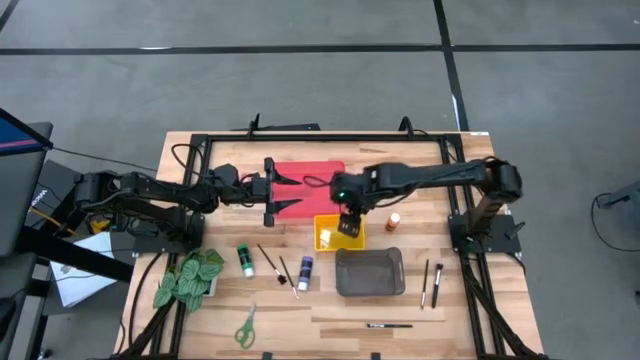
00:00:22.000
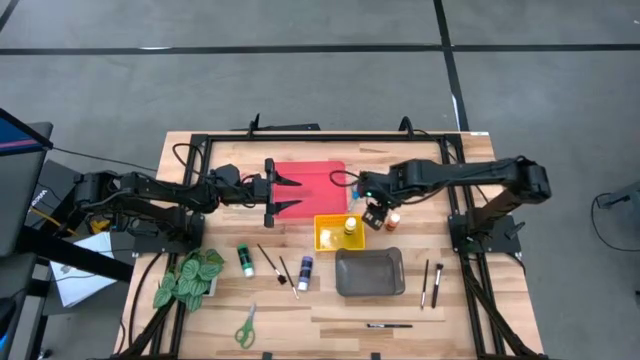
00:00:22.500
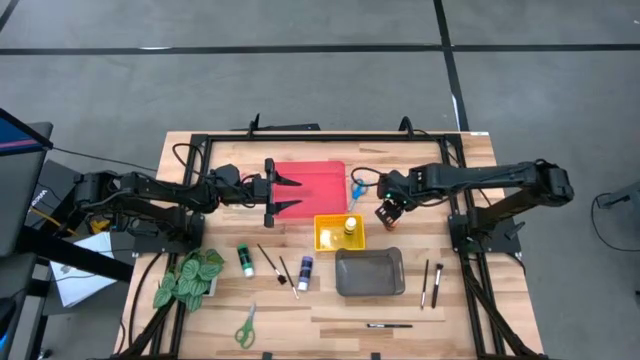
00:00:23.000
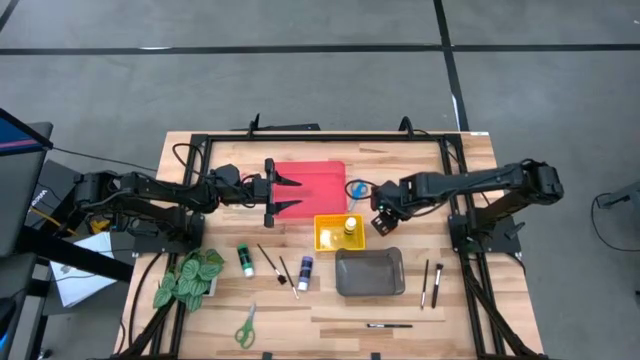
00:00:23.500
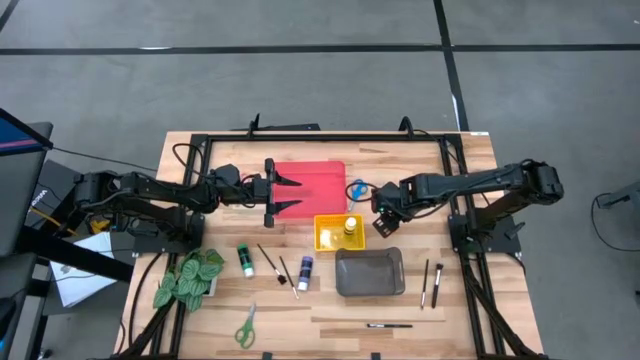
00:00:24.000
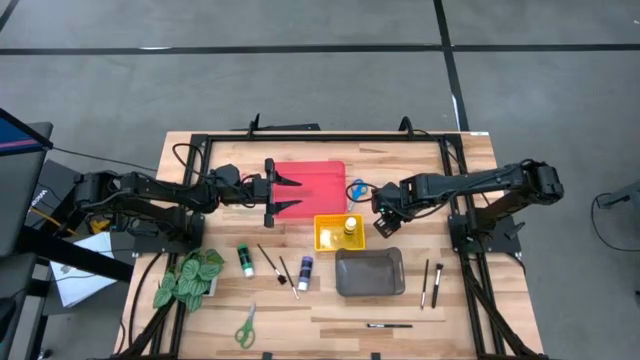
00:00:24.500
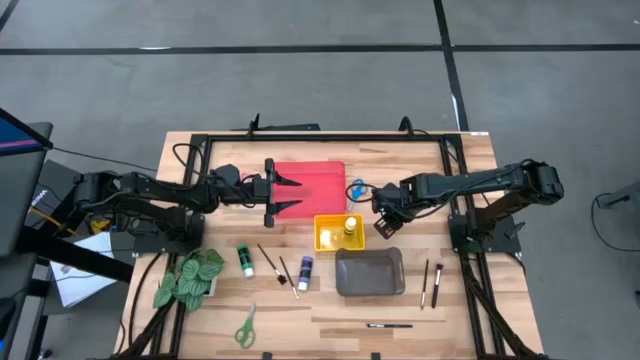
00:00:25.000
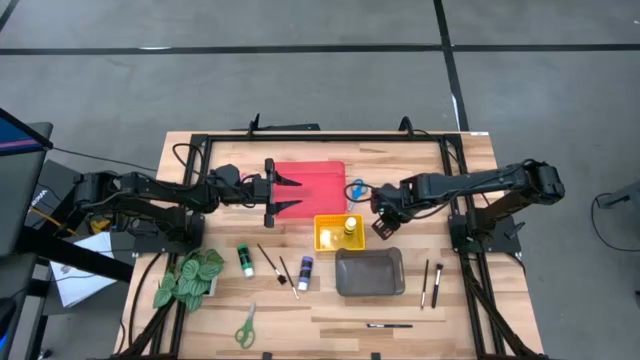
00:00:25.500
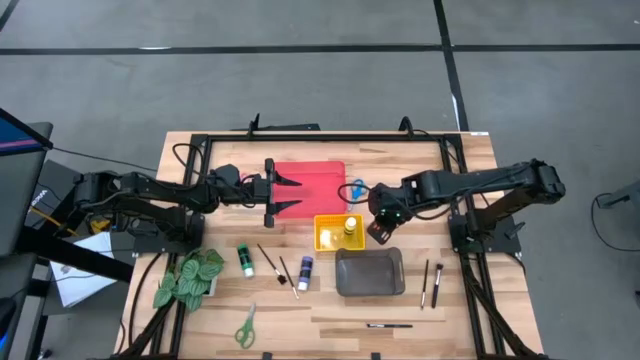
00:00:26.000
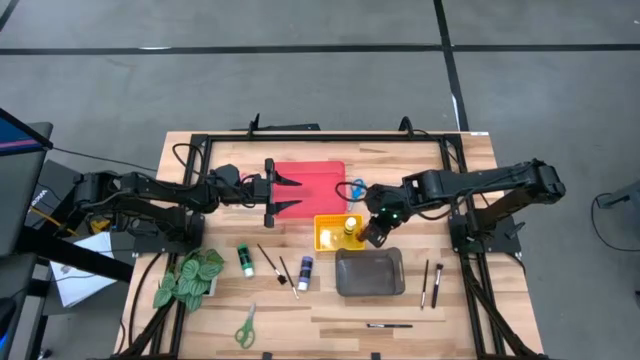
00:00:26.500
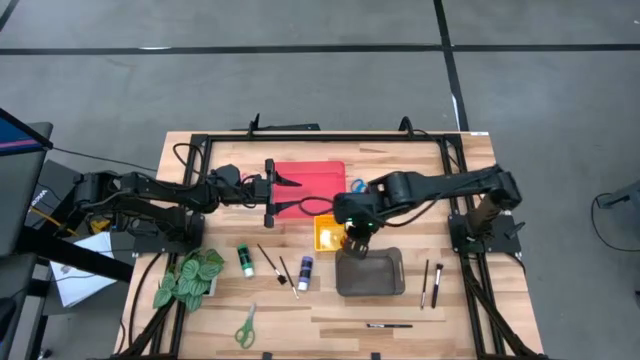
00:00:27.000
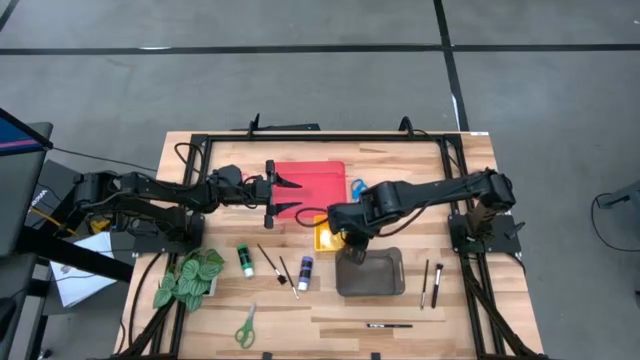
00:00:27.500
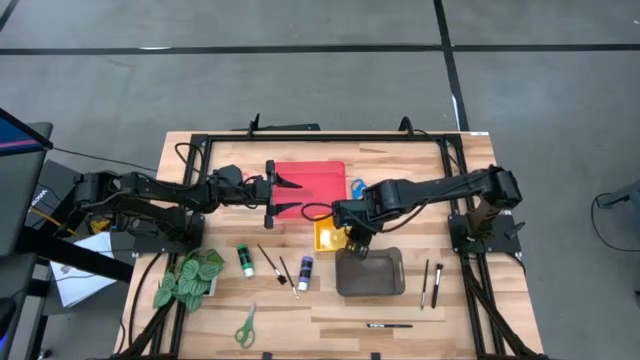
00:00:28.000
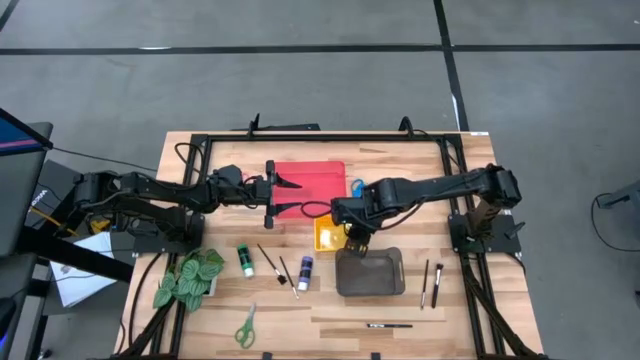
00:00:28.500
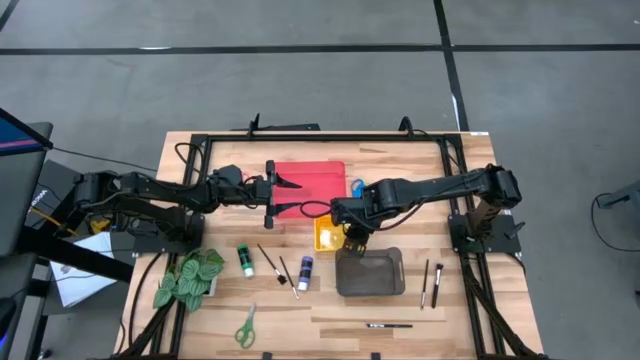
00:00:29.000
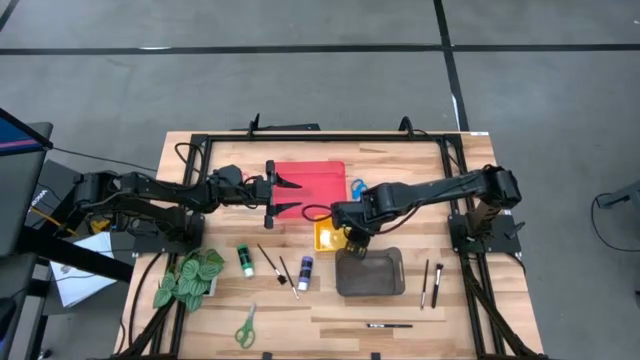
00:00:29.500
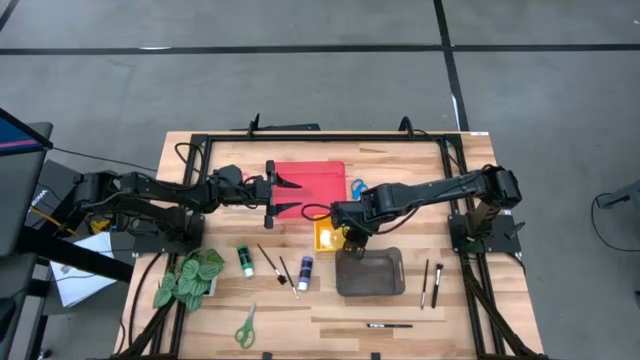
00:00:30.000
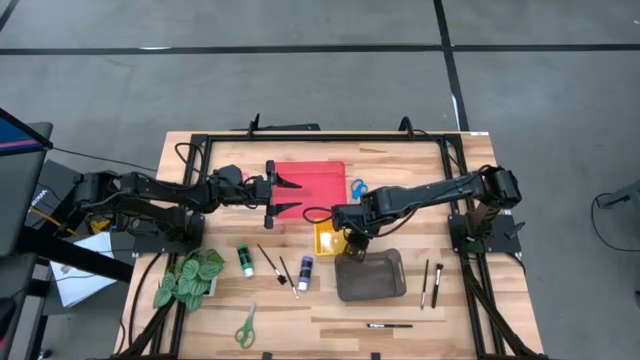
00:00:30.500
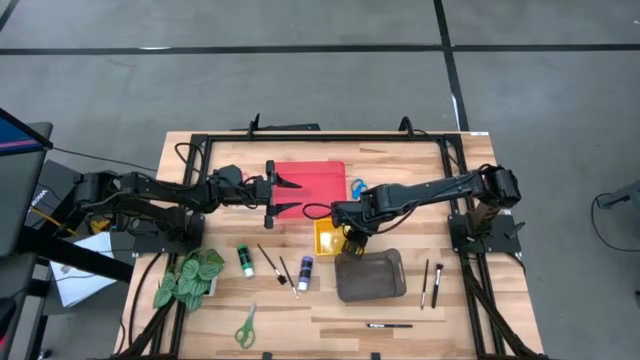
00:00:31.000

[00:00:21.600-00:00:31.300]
Task: Pick & Place Paint Supplies
Put the orange paint bottle into the yellow bin

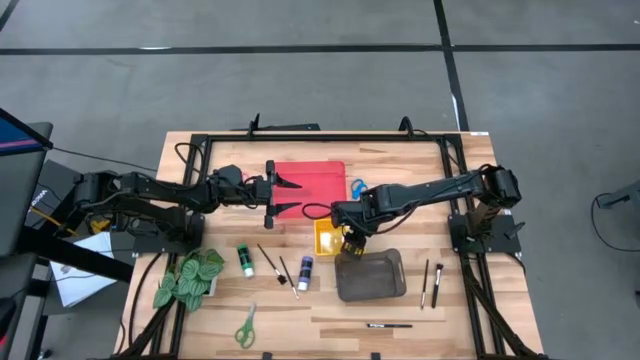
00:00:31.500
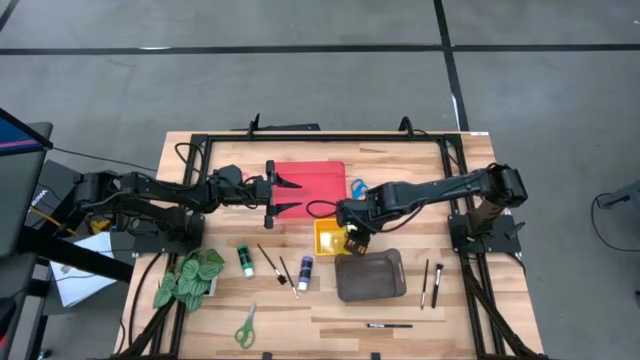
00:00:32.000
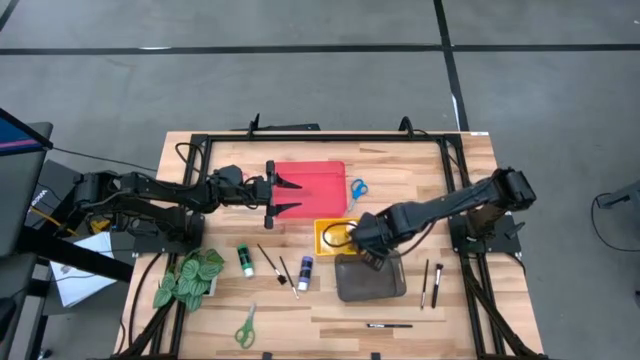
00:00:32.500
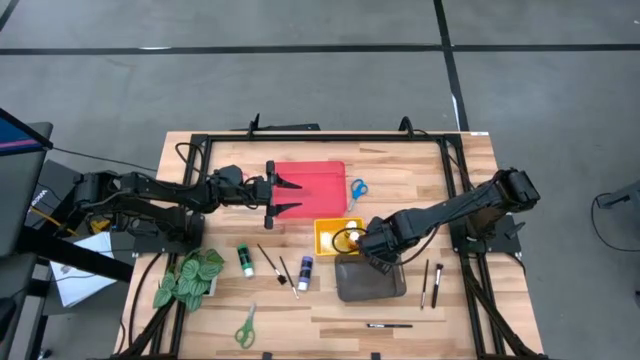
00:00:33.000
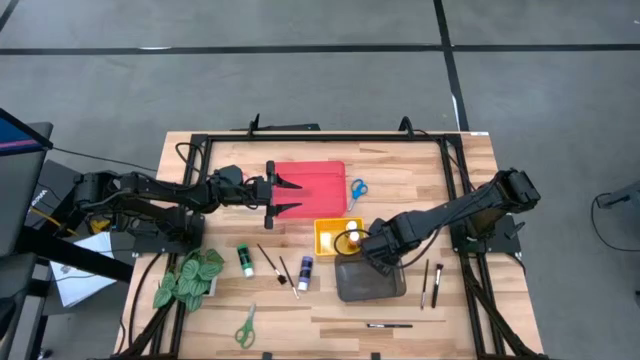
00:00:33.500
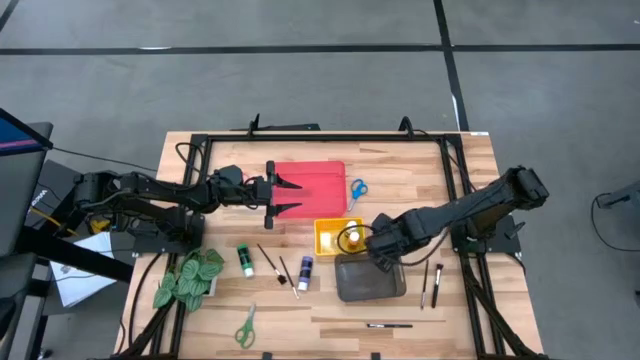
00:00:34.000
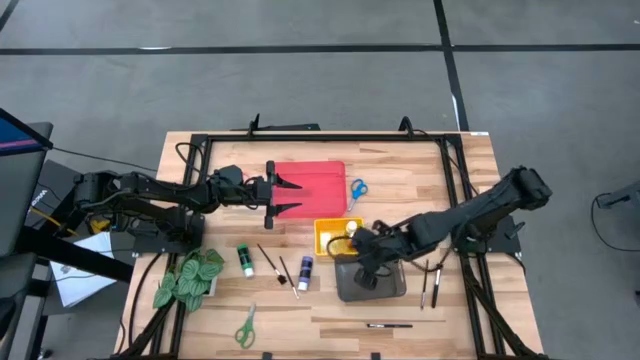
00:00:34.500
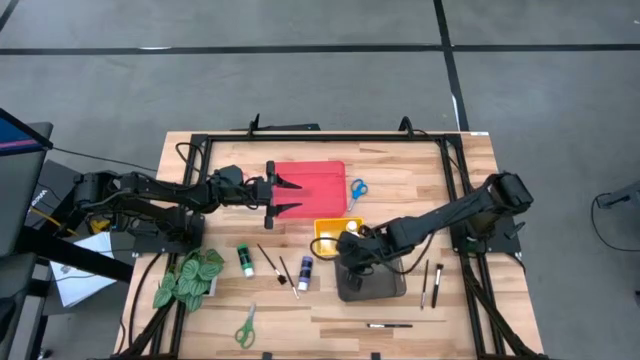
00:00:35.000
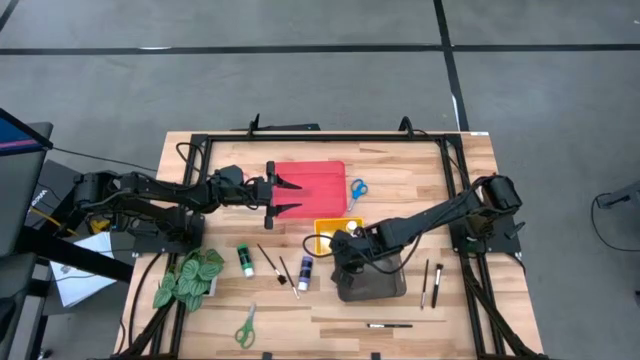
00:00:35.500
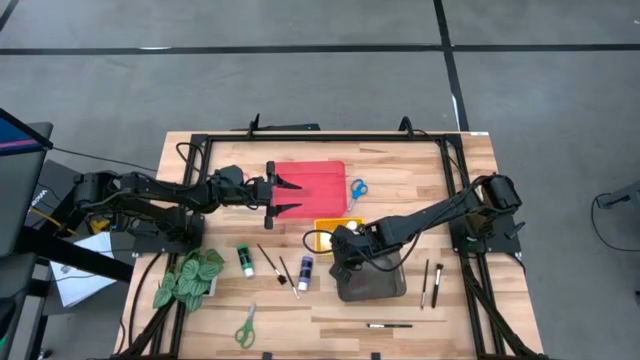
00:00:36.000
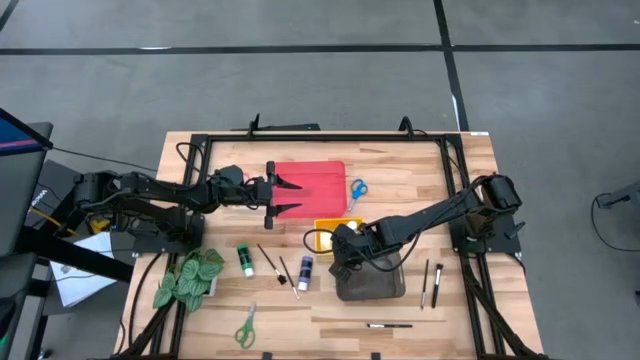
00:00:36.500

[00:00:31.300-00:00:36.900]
Adjust the black bin

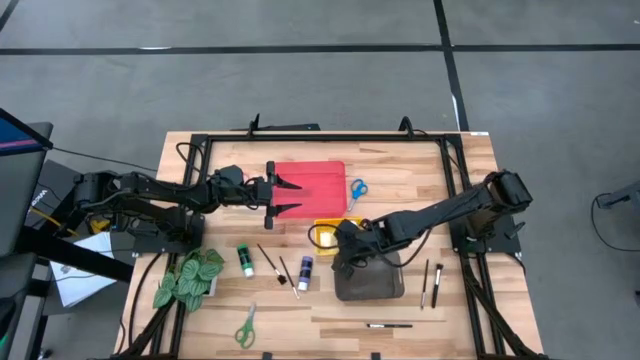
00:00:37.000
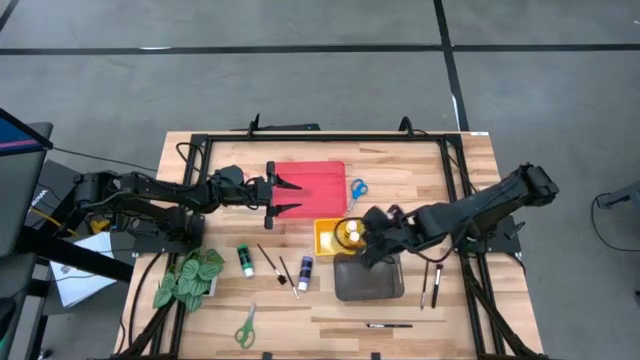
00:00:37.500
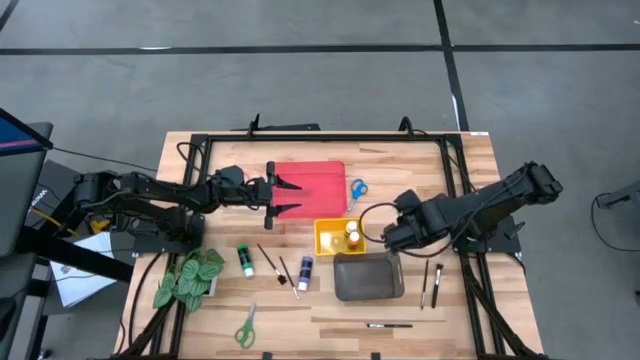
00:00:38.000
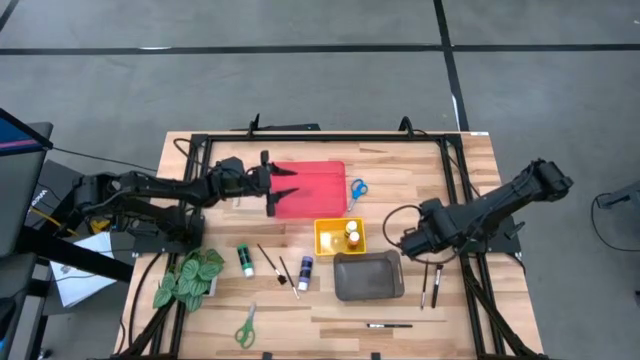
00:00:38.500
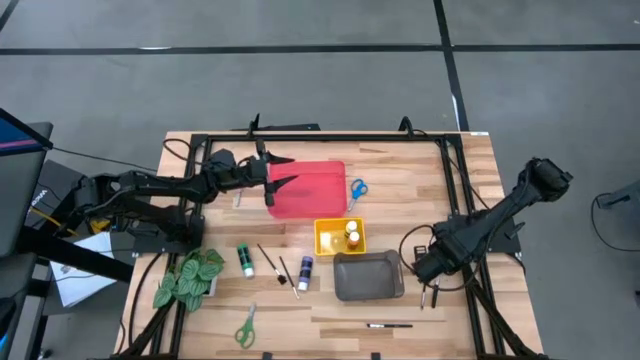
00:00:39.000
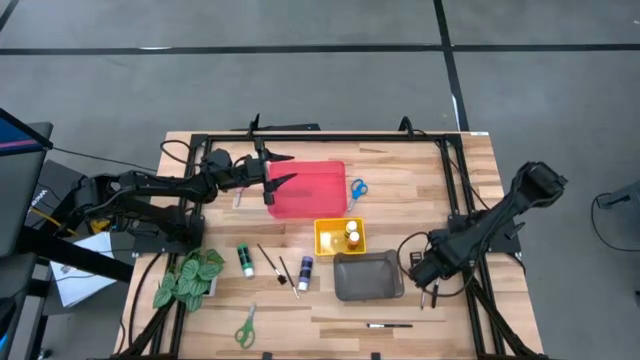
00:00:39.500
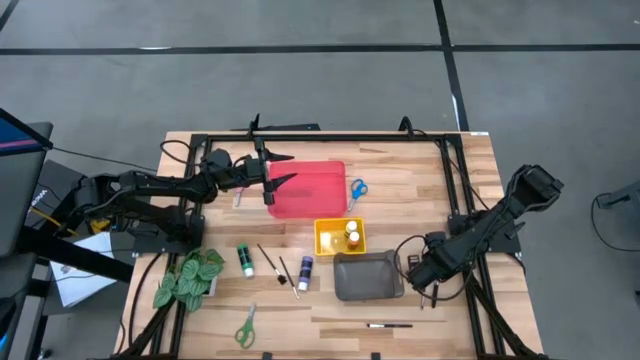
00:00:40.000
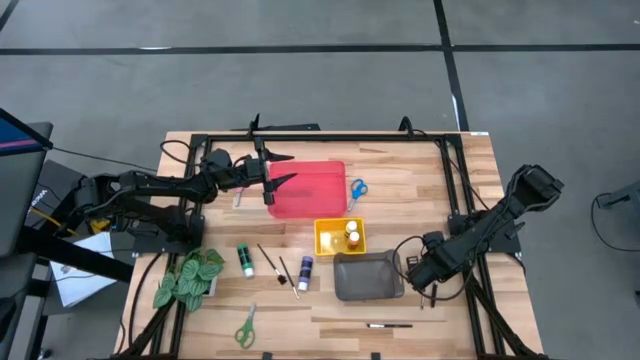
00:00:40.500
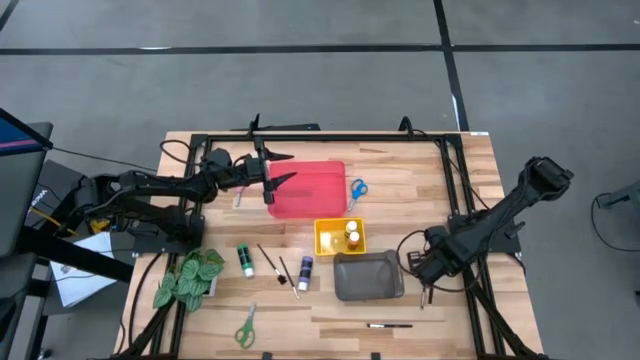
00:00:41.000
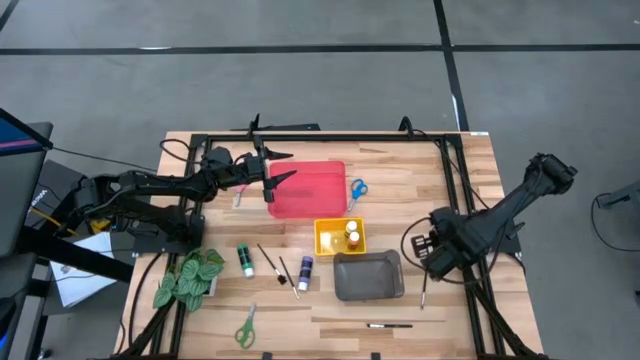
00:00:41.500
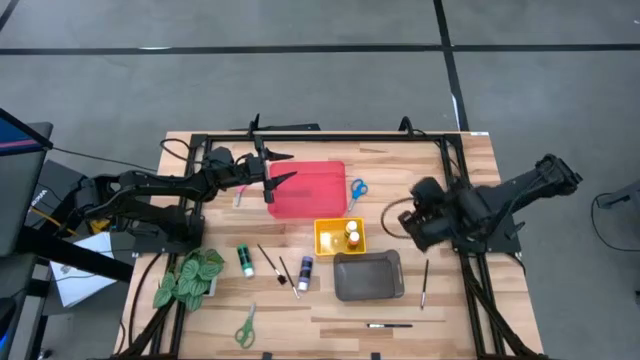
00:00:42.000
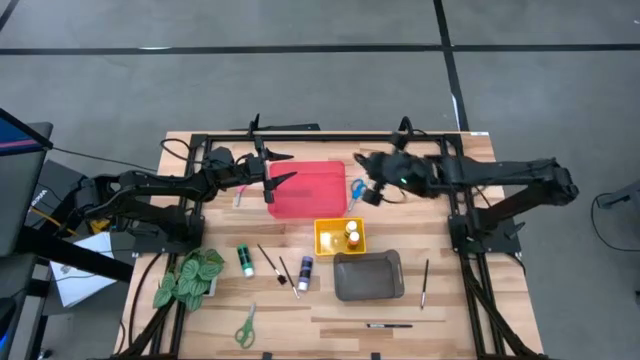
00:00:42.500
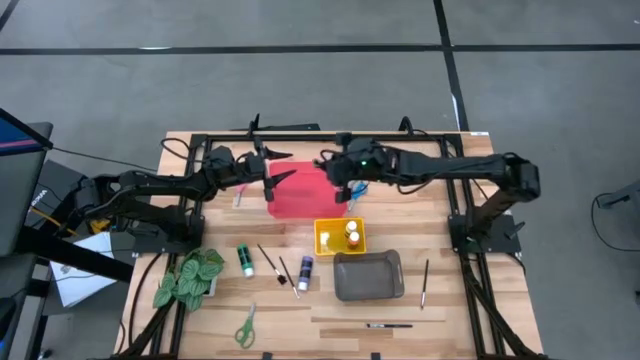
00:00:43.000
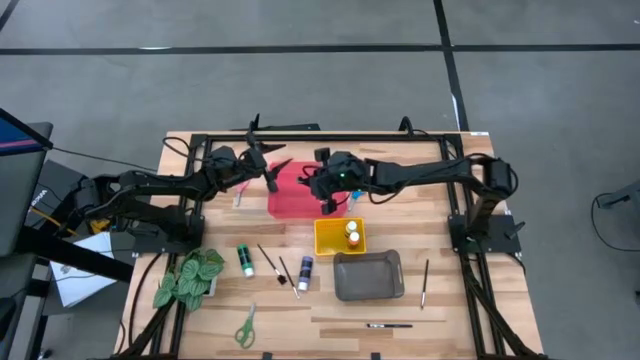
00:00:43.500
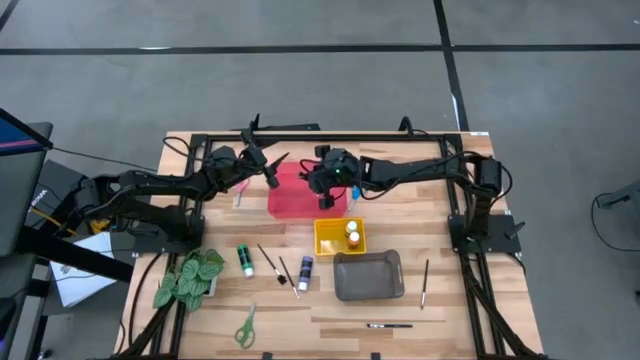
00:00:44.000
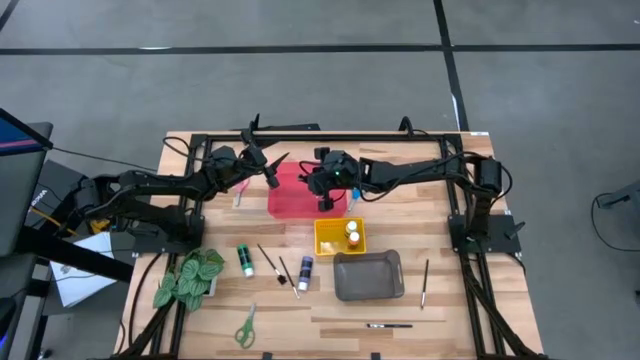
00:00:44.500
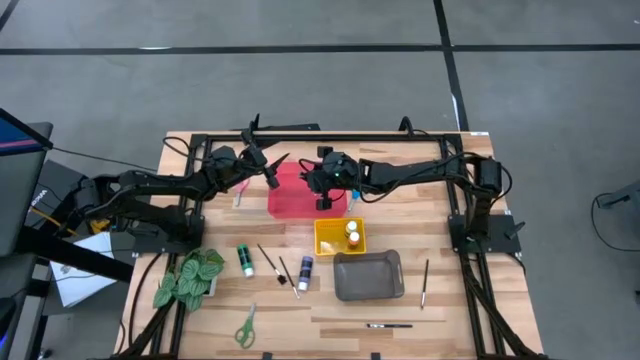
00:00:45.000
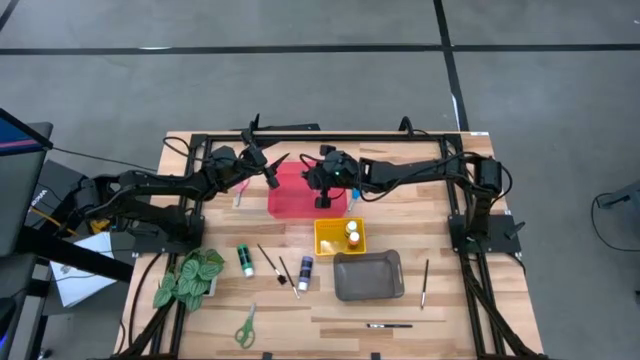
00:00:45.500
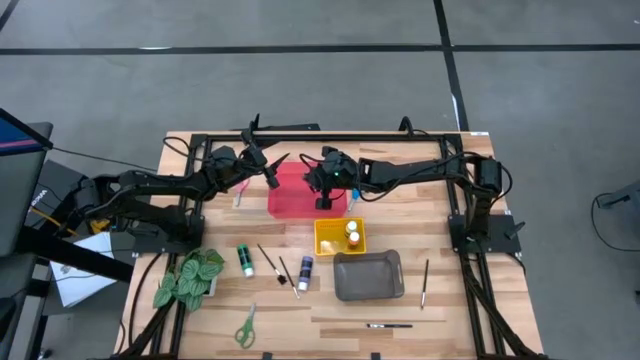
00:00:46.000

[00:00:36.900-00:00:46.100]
Put the blush brush into the red bin
